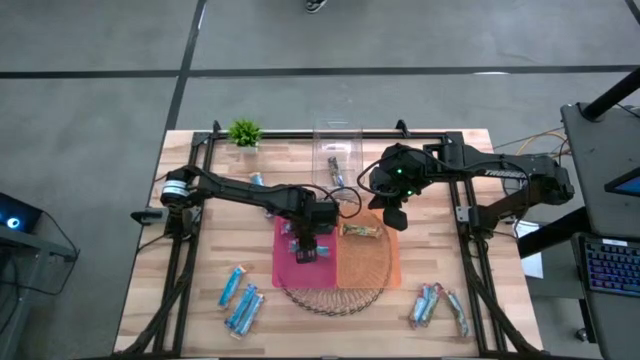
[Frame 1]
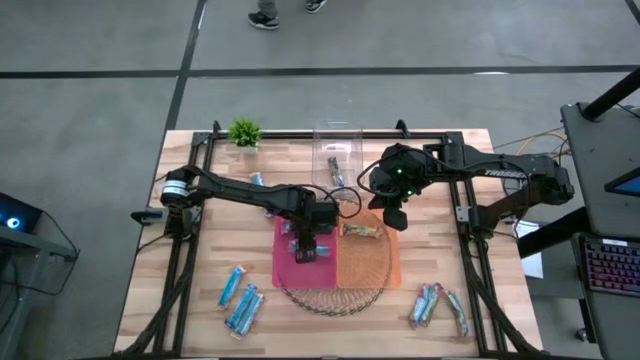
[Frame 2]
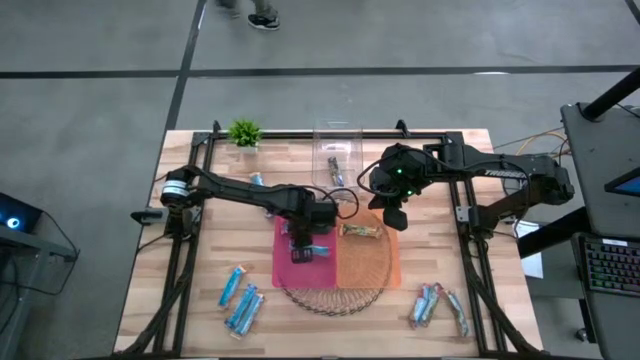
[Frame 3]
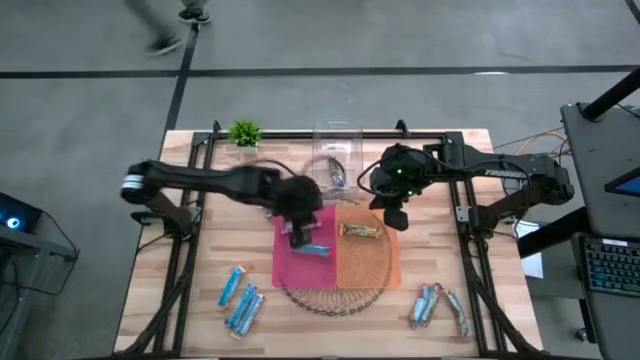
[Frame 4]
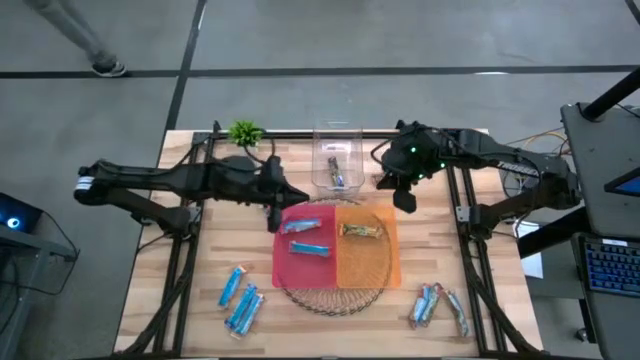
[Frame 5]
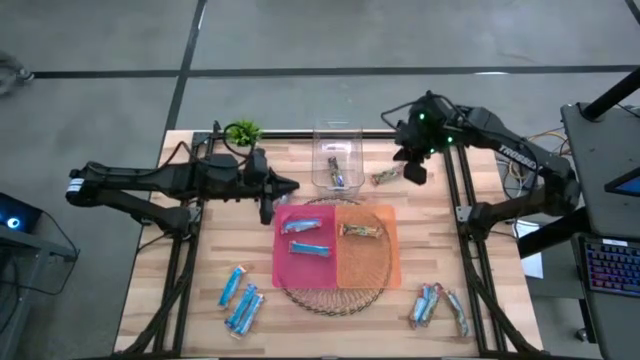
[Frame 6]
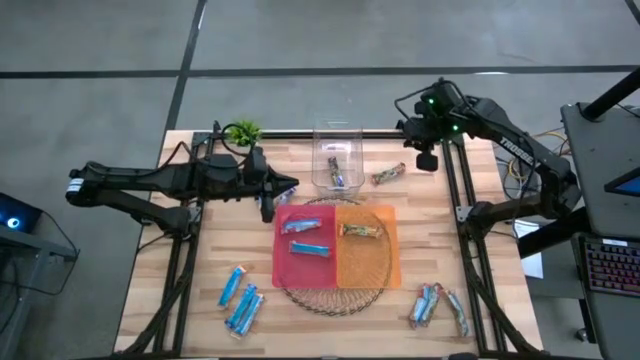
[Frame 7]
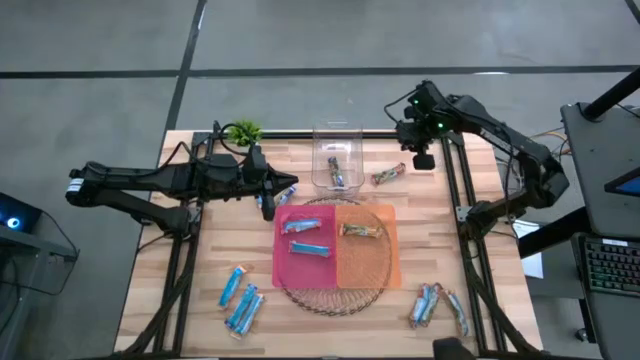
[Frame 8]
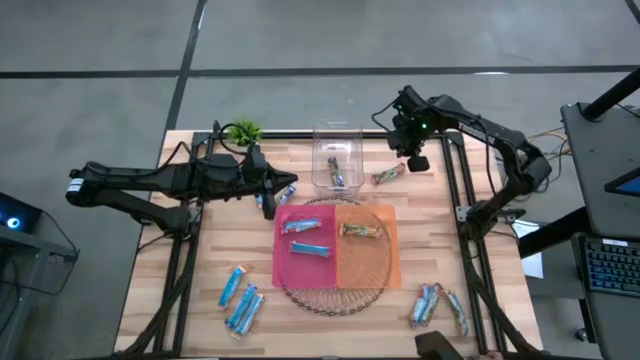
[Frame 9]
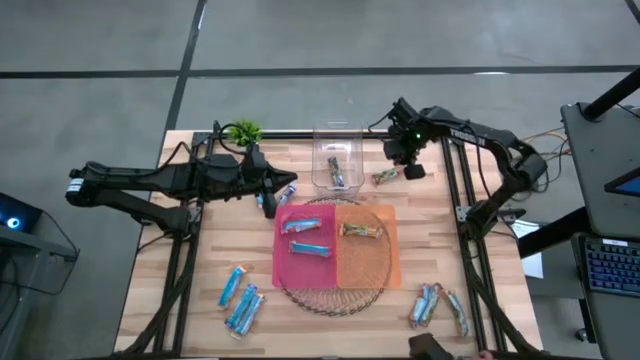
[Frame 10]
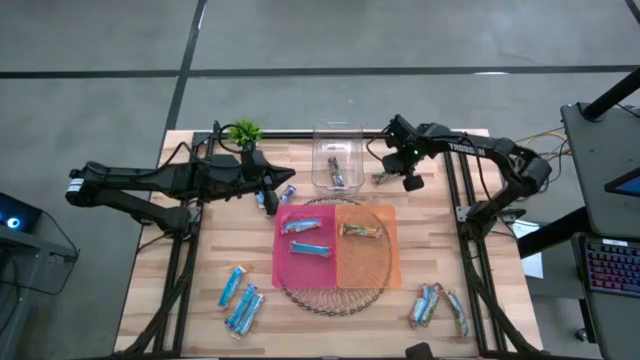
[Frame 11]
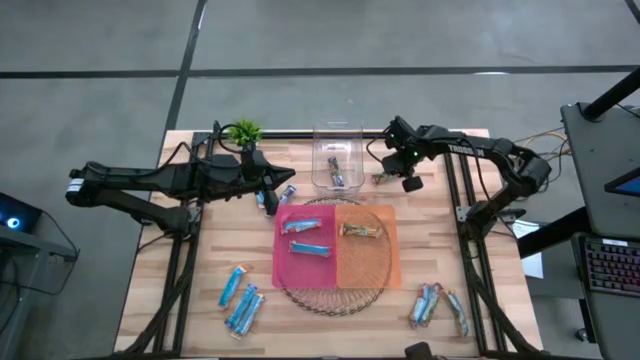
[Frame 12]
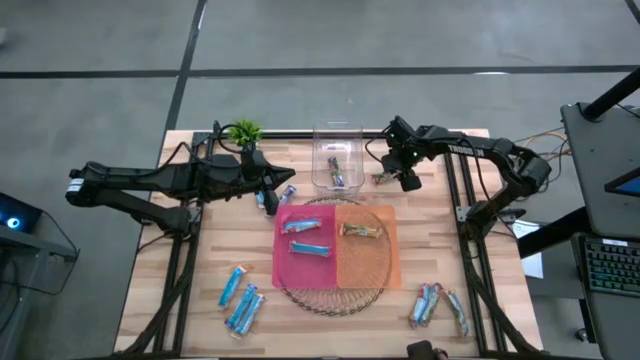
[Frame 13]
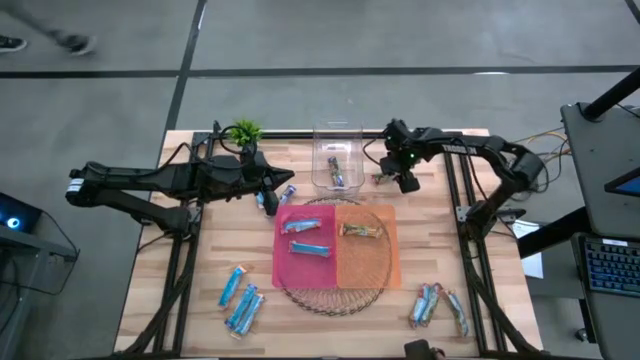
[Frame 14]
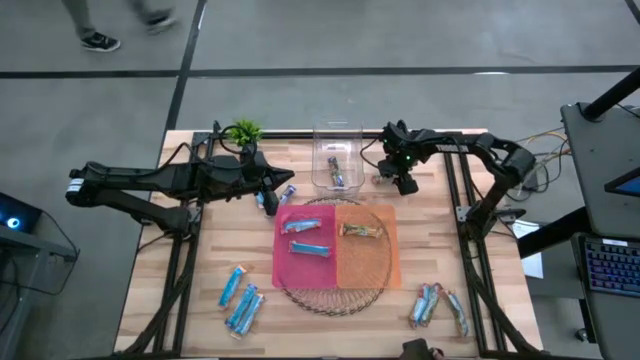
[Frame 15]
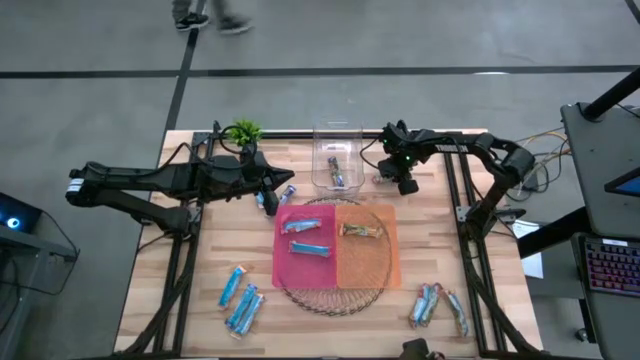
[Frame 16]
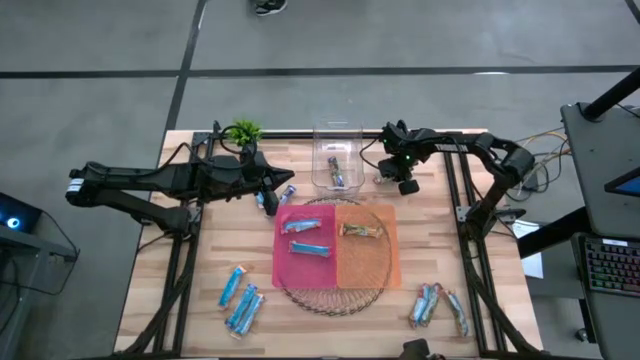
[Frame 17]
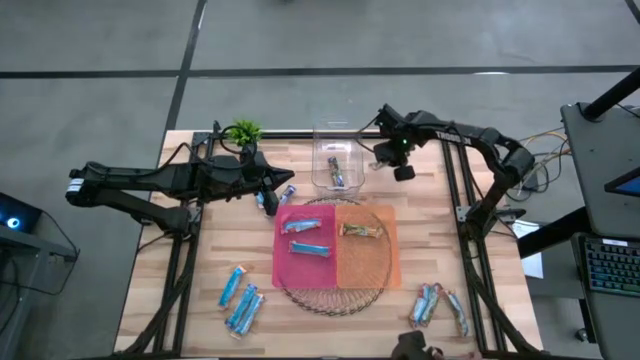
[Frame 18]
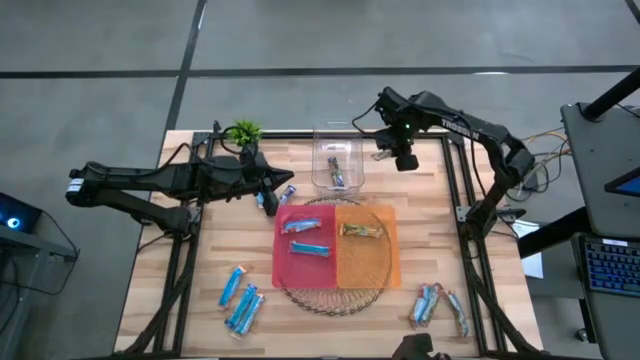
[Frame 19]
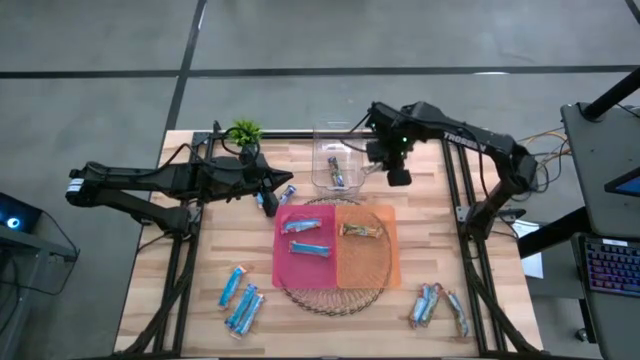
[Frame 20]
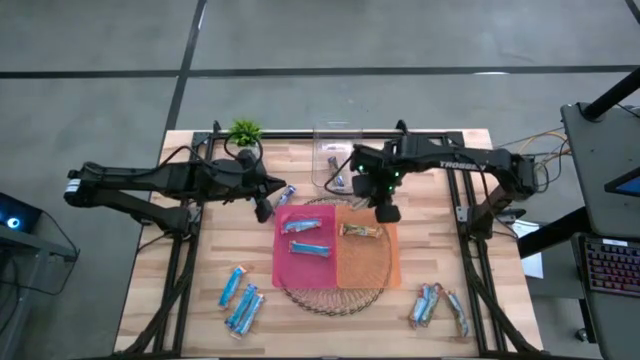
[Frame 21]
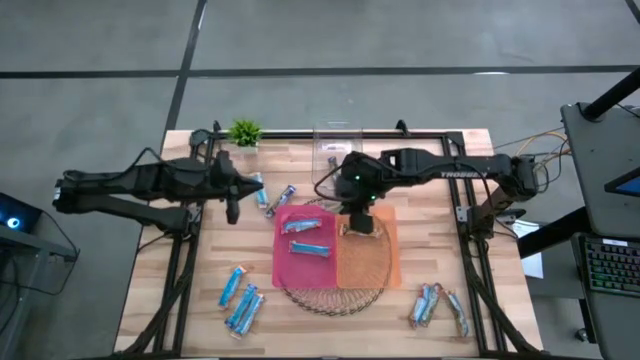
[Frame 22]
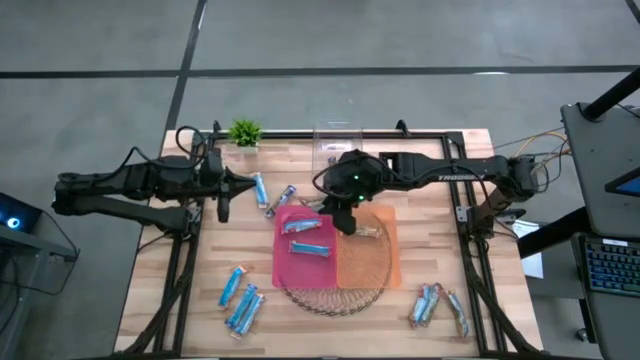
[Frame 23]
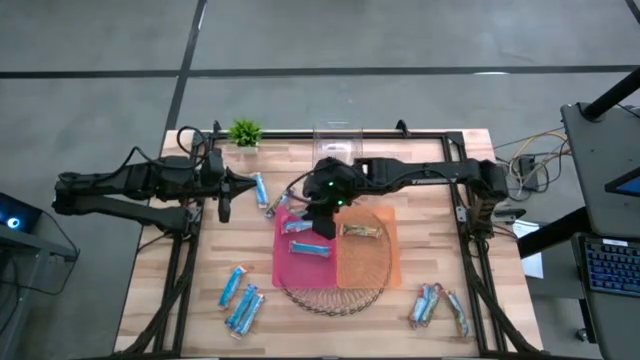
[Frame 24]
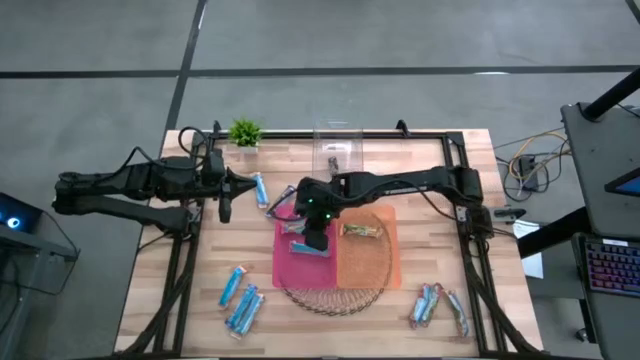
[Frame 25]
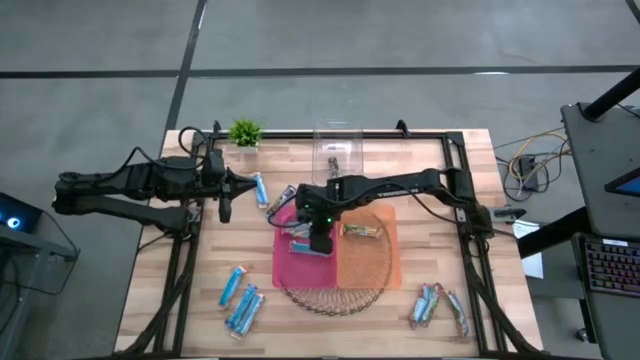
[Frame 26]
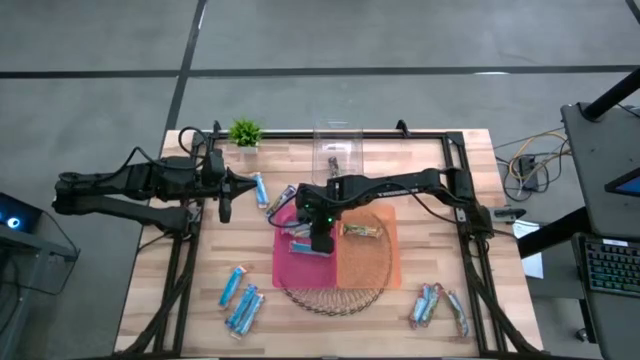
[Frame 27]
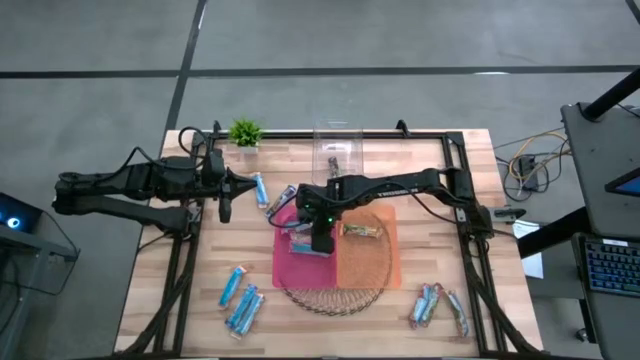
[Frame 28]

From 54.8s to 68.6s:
Task: Pick and place Granola Bars by type
Put the red granola bar into the red bin

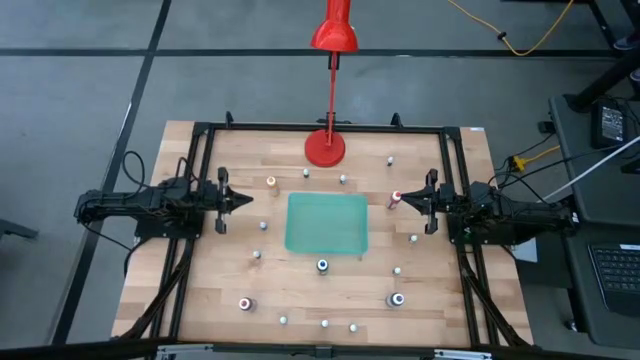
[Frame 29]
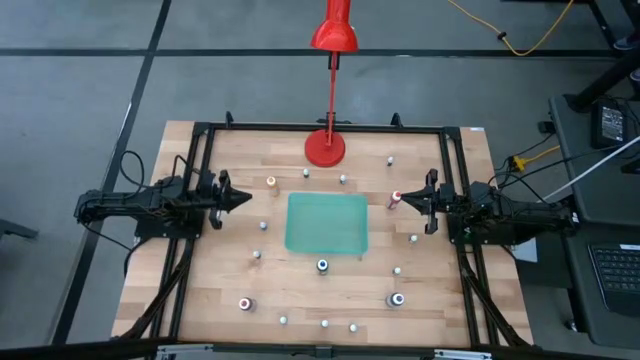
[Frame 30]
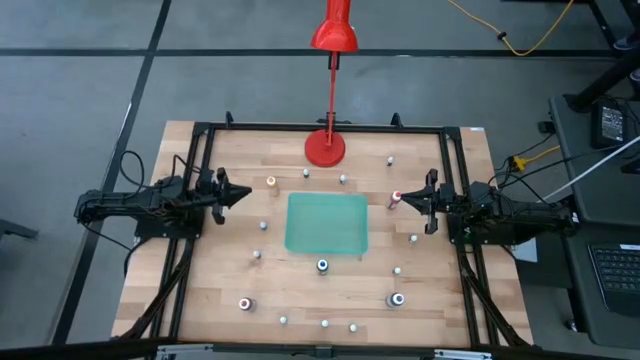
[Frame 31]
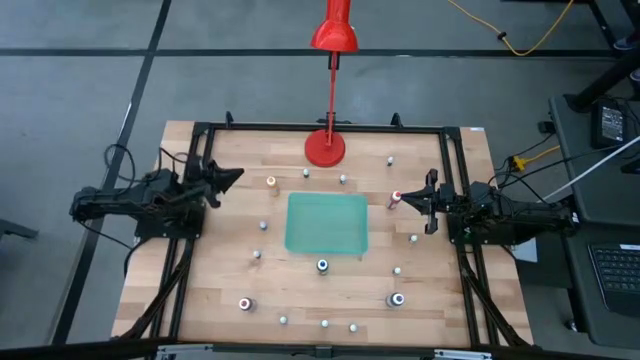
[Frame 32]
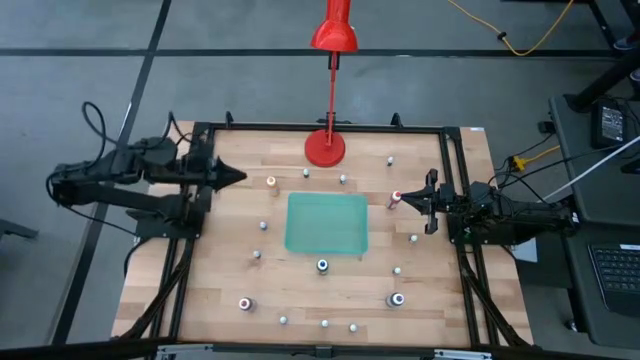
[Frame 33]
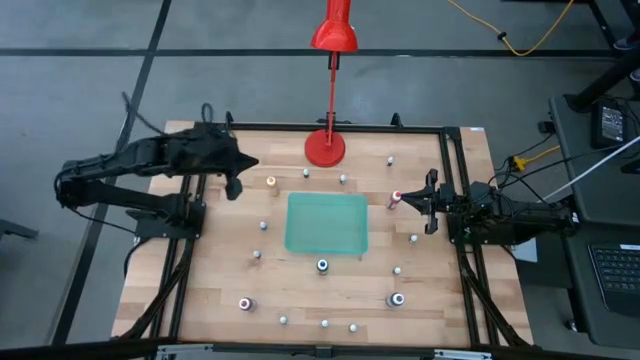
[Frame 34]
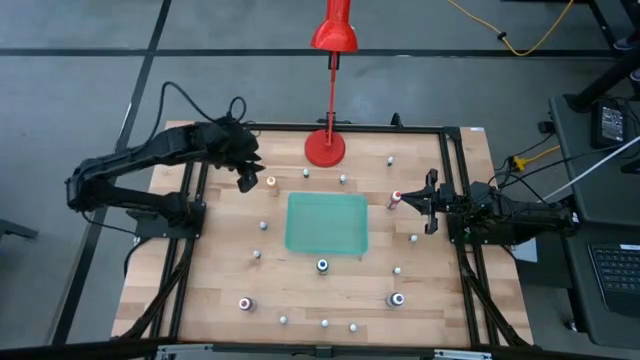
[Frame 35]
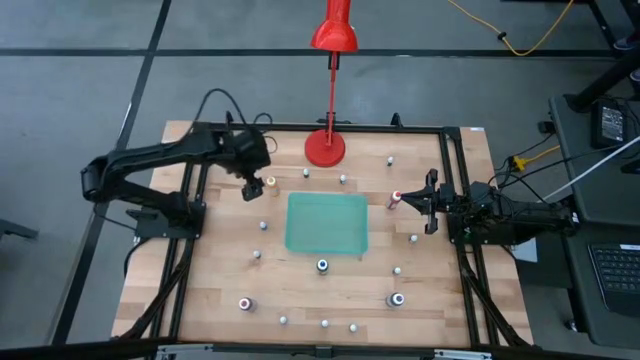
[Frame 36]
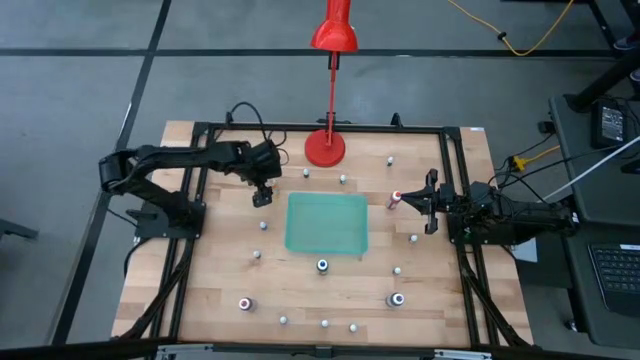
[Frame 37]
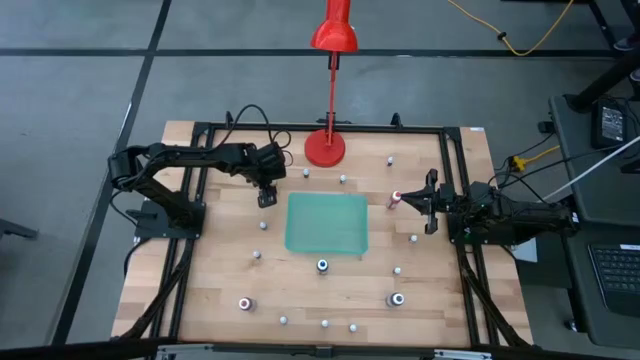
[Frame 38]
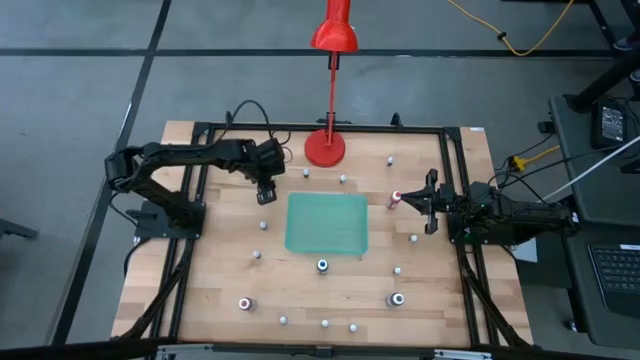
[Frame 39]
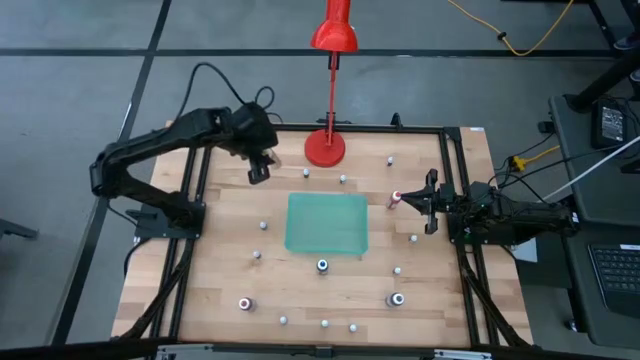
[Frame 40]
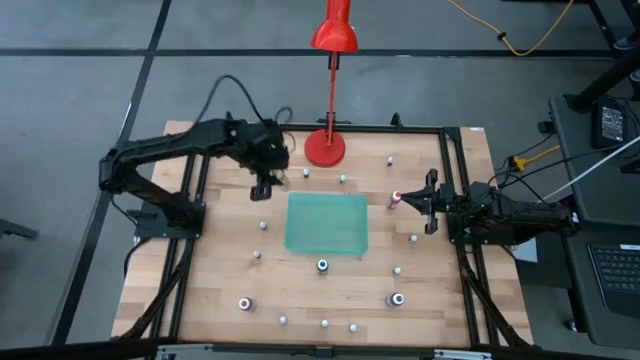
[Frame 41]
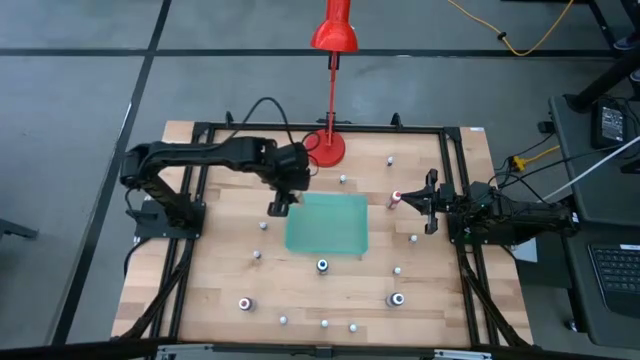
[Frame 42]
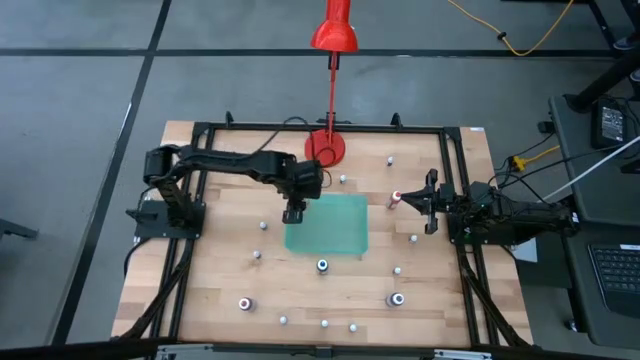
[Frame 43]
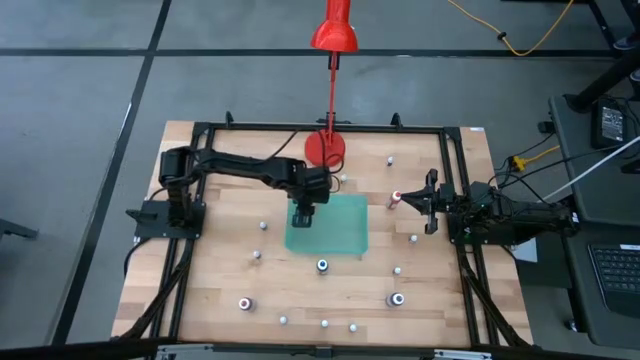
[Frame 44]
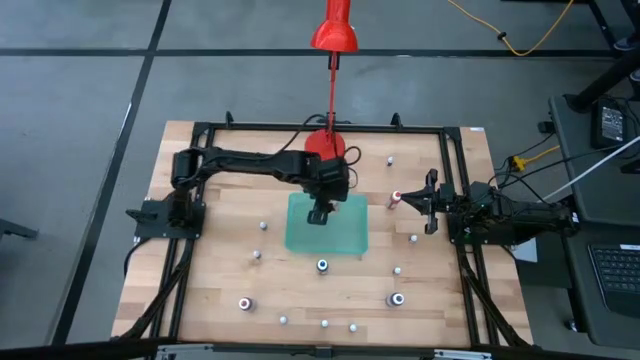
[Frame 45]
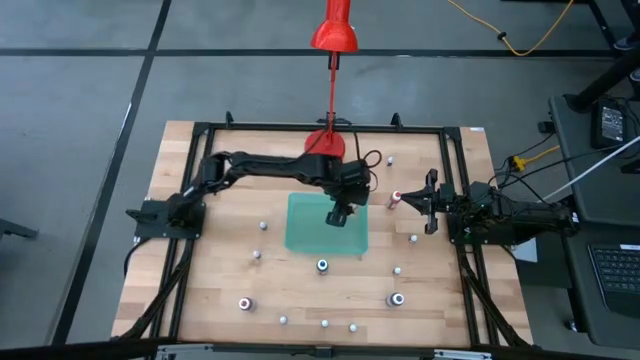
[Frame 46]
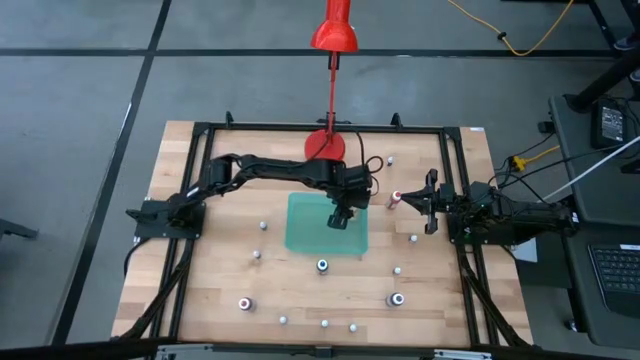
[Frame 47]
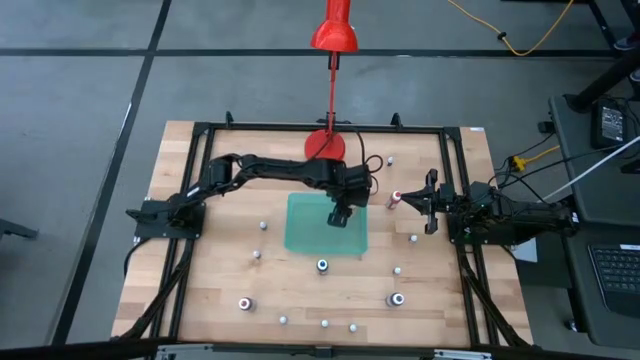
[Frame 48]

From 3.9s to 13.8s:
Task: Pick & Place food coloring
Put the large yellow food coloring bottle into the green bin
